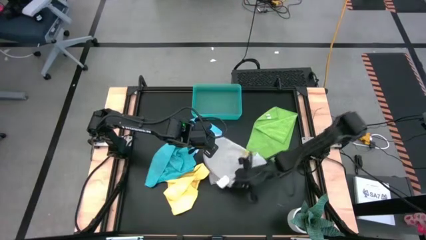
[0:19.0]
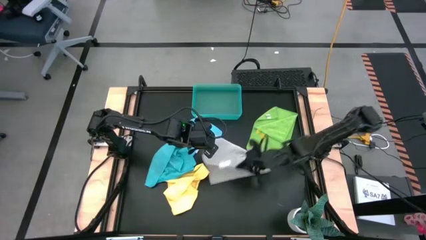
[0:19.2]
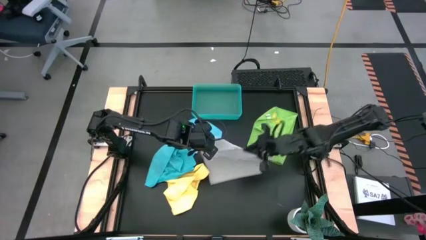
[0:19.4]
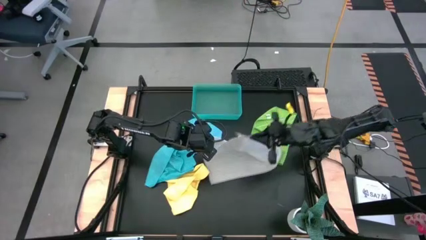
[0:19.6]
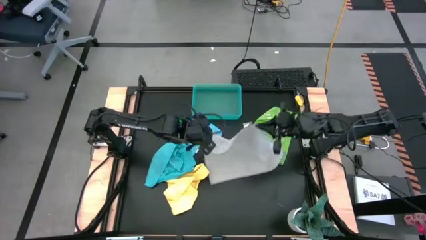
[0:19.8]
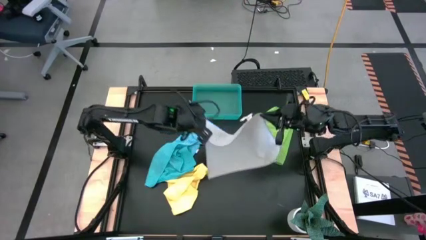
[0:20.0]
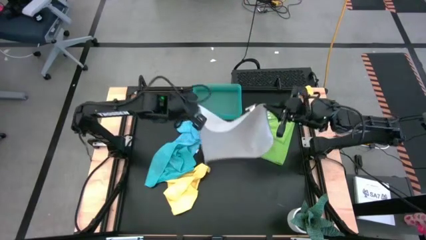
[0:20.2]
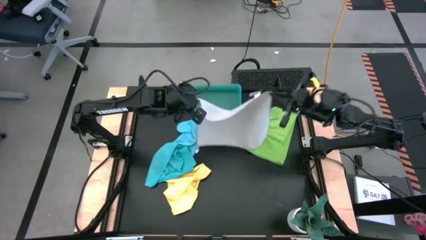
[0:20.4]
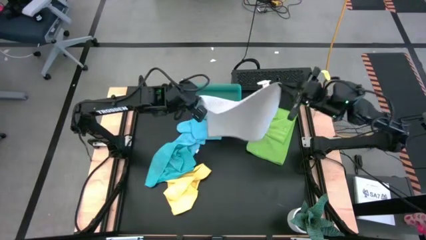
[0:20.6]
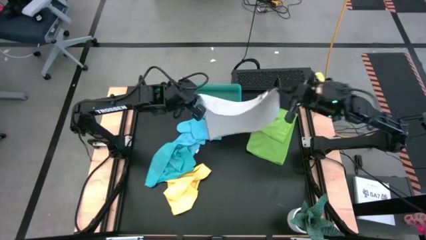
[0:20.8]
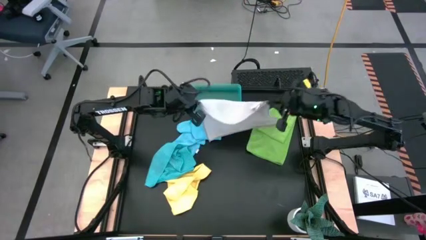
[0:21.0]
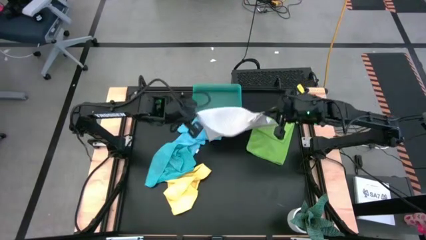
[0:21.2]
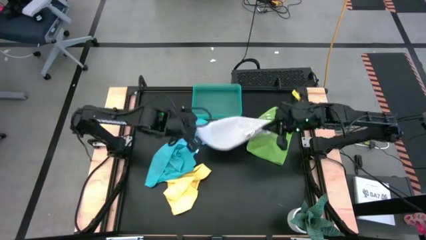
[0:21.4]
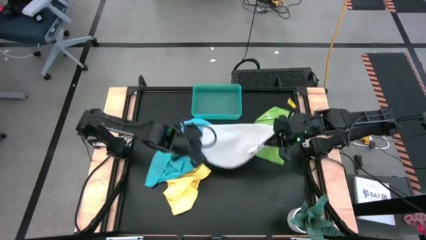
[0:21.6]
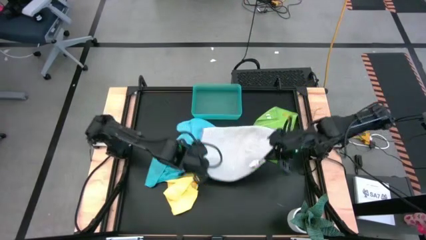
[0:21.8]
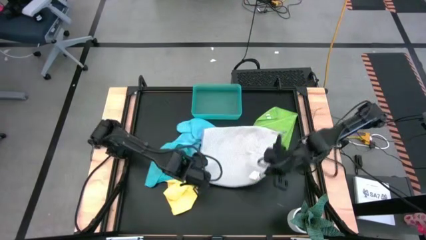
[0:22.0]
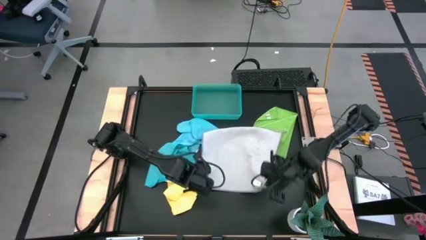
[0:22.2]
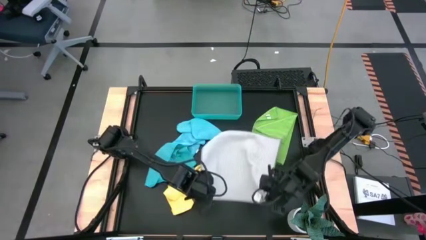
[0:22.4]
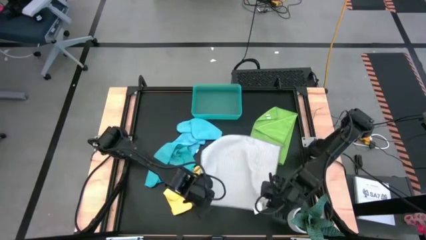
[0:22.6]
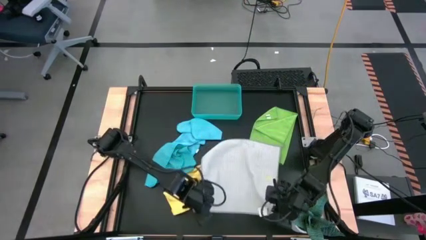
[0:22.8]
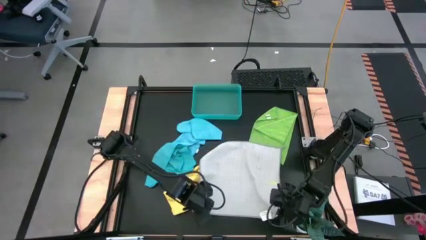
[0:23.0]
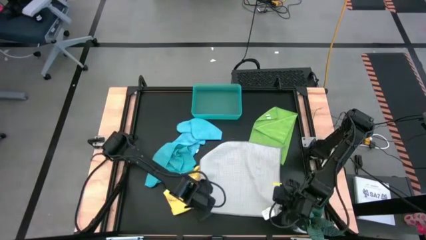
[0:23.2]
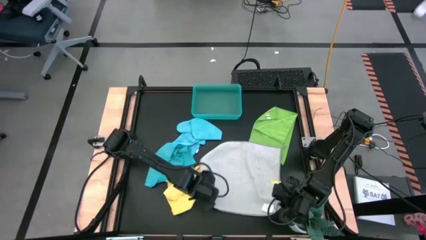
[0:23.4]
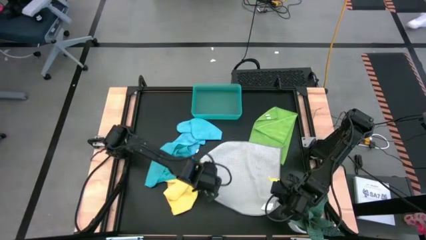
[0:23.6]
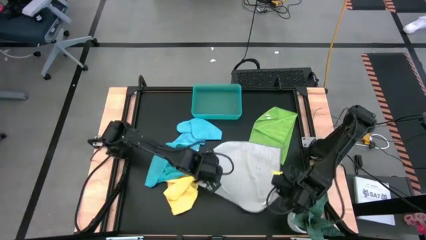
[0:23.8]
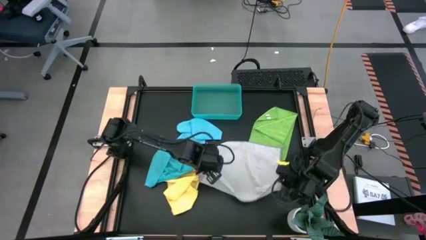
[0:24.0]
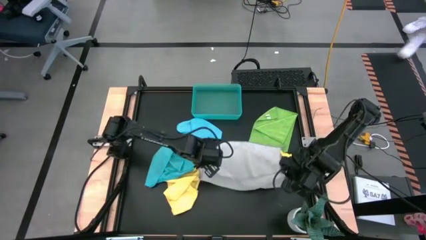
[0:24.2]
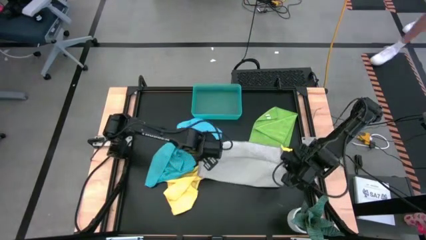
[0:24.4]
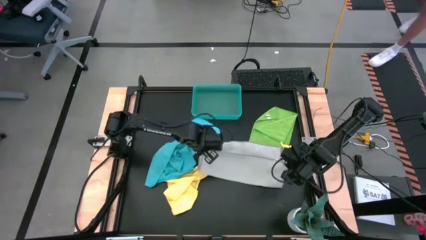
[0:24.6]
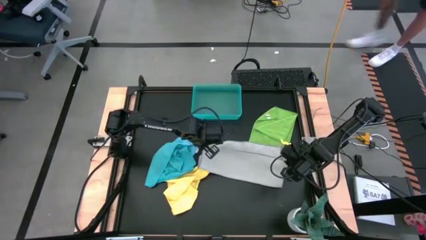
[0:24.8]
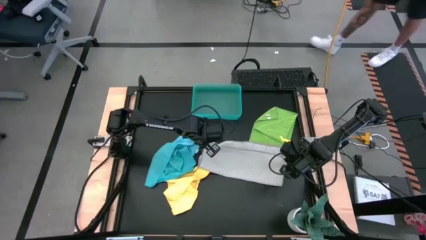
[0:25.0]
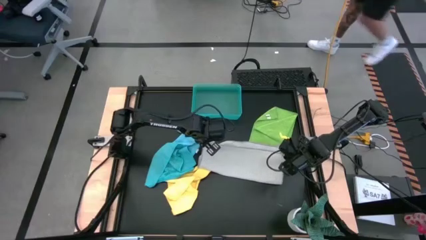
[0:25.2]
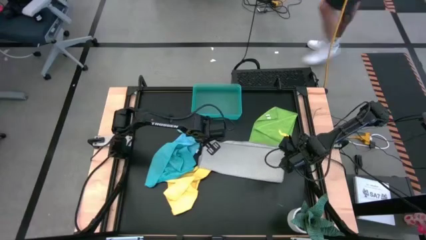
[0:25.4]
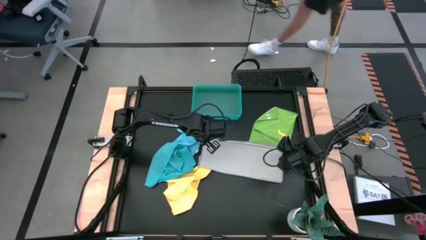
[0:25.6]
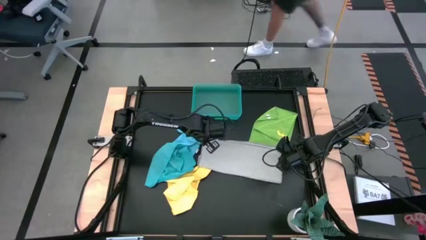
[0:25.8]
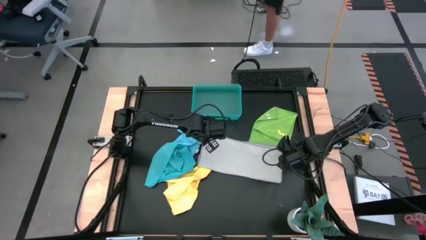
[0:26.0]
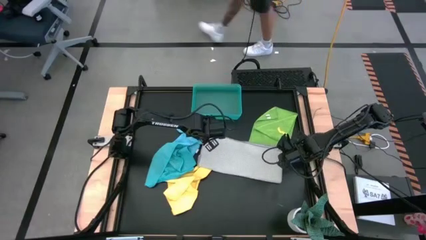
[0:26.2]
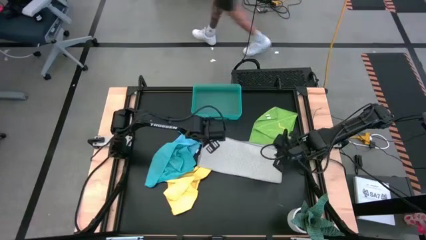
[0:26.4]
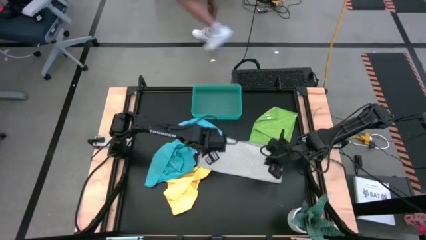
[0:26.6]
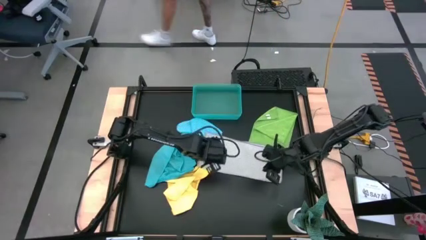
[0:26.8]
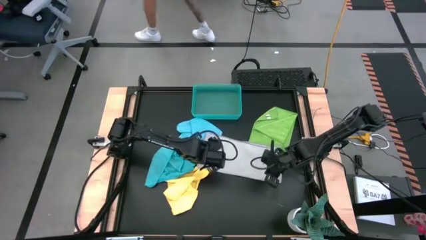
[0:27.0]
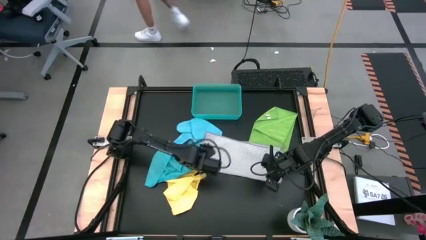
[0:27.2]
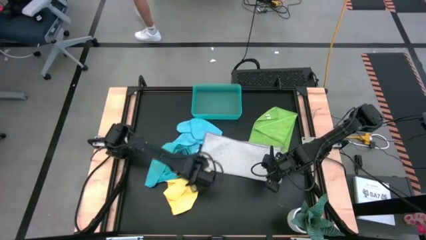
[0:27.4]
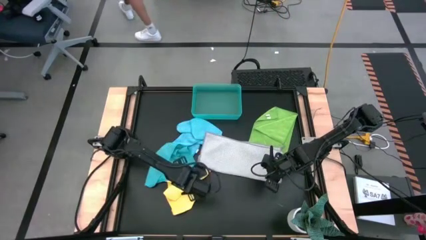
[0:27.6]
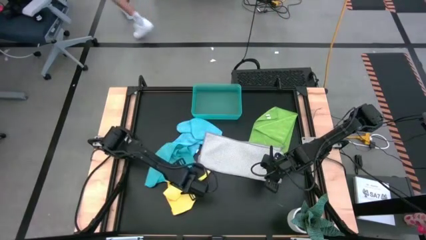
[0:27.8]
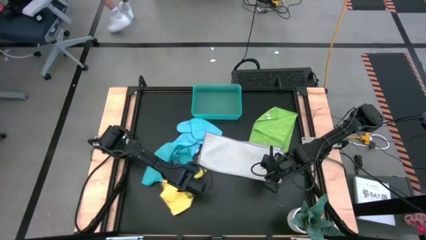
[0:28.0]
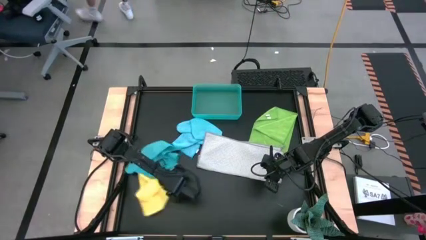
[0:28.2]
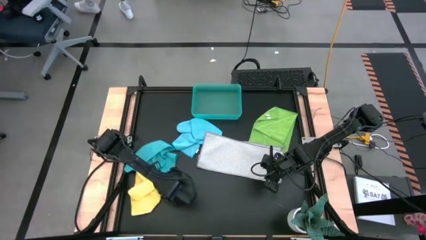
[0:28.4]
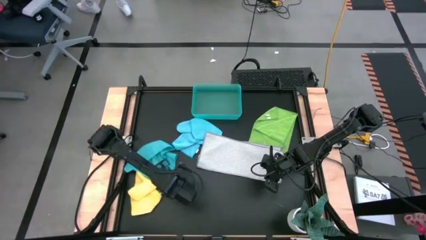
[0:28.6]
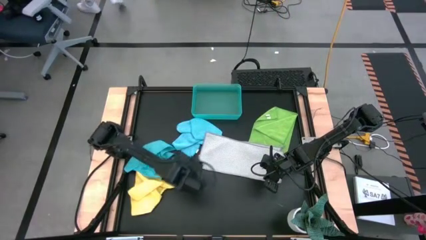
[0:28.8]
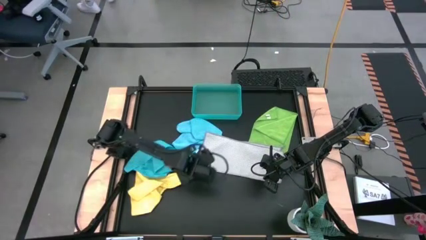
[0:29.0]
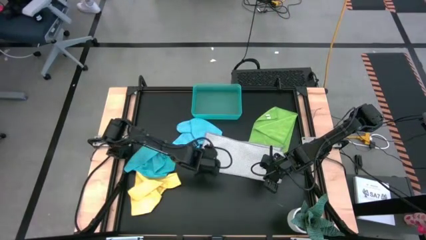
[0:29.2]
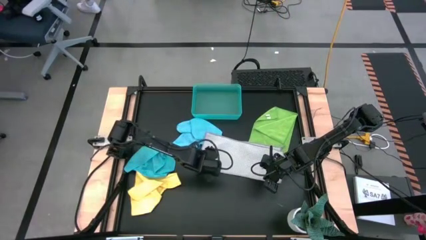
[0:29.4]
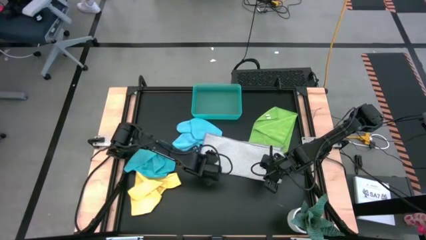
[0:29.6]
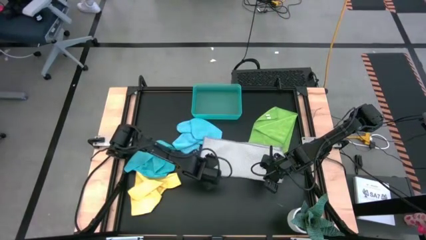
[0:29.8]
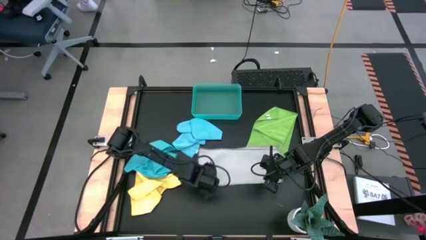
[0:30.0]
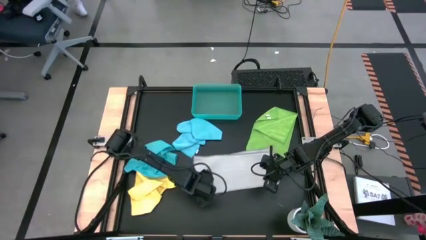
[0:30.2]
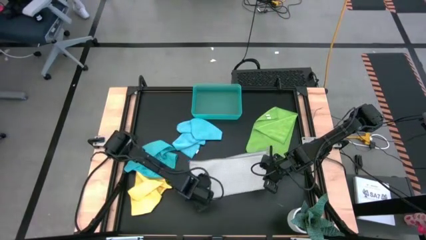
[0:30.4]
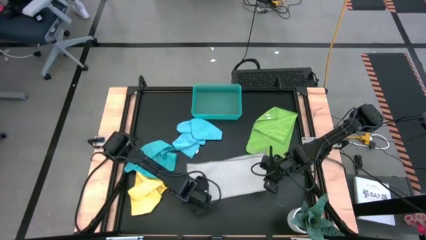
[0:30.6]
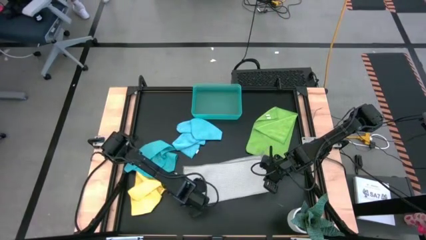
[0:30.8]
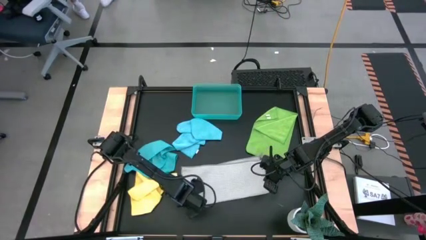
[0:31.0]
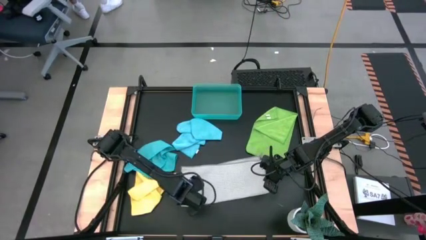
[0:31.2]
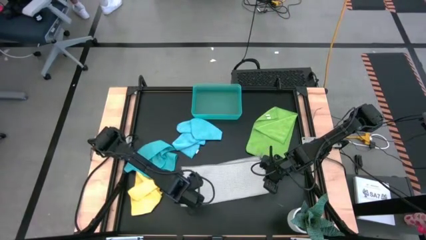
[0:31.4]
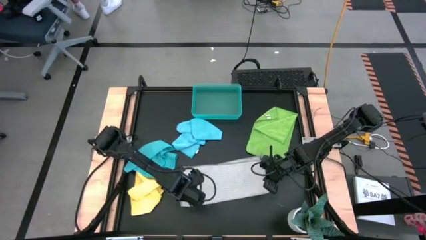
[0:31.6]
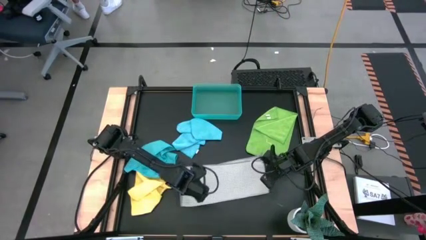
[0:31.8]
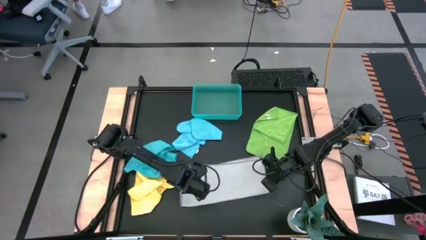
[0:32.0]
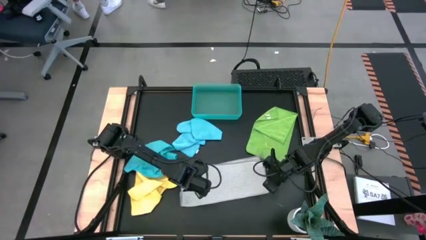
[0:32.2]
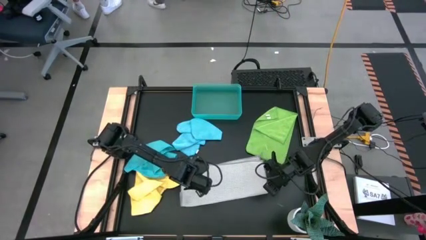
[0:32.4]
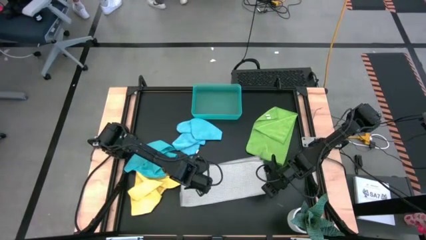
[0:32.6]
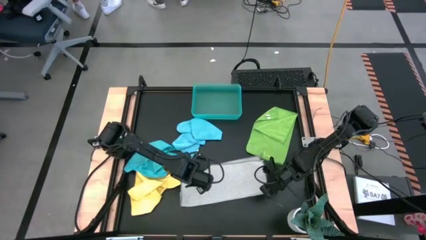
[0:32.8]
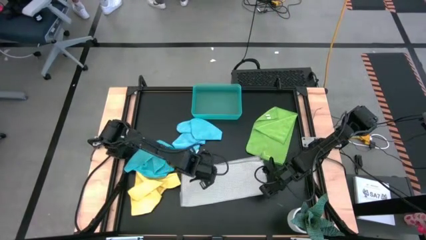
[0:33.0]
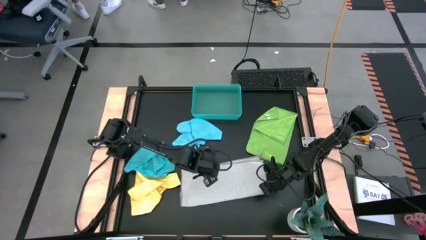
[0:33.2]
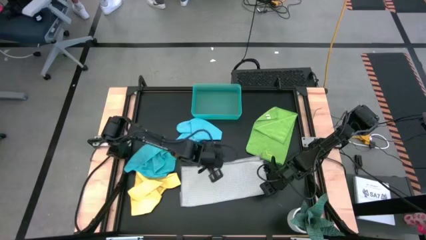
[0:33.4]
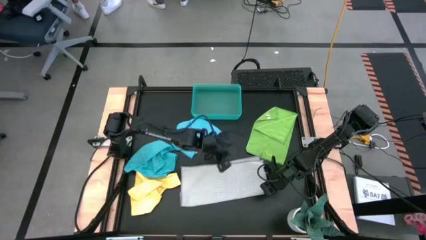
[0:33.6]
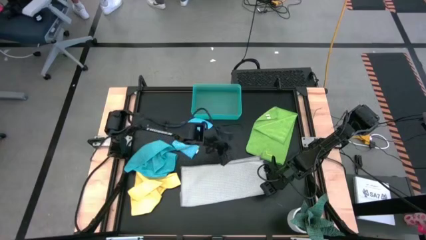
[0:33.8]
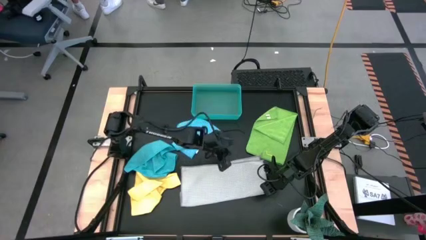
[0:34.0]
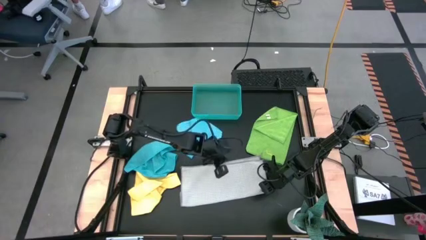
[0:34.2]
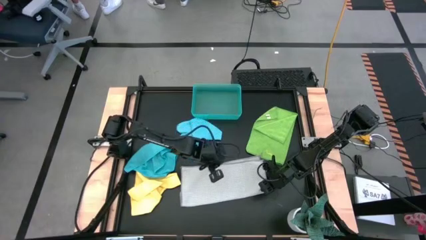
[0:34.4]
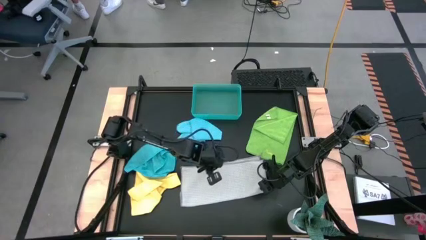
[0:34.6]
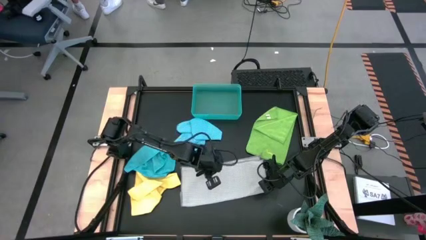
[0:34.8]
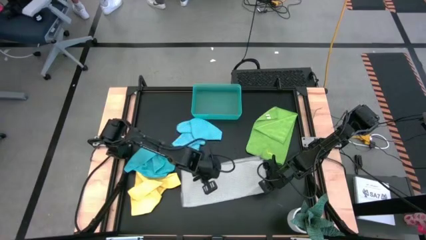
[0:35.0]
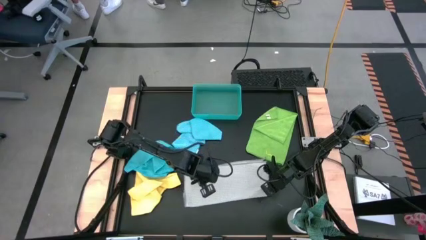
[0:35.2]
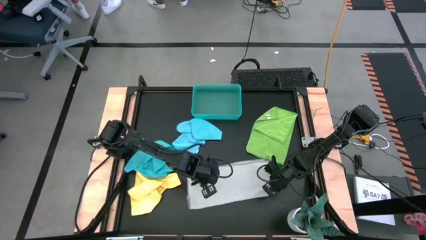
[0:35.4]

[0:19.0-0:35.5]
Task: Fold microfiber towels
Fold the gray microfiber towel
